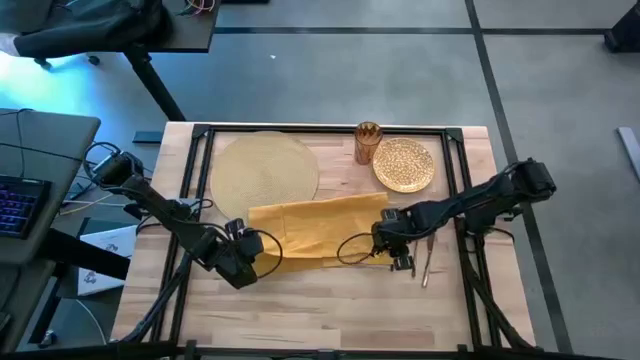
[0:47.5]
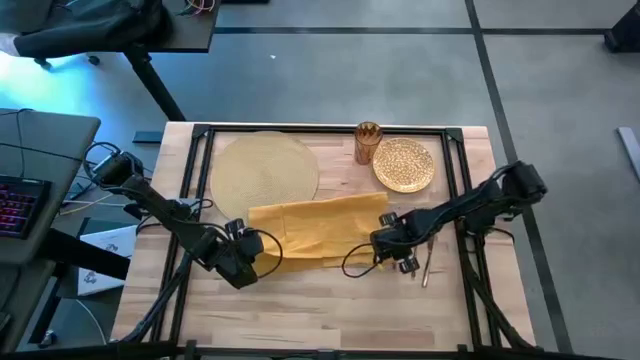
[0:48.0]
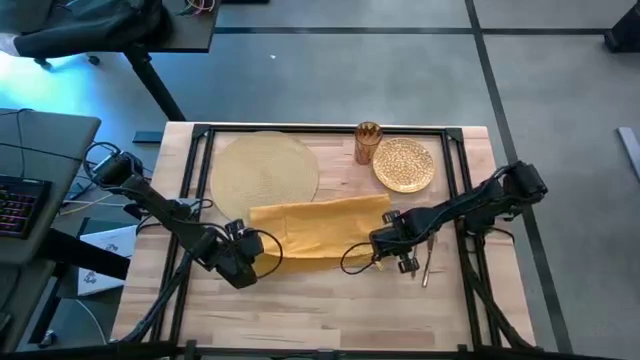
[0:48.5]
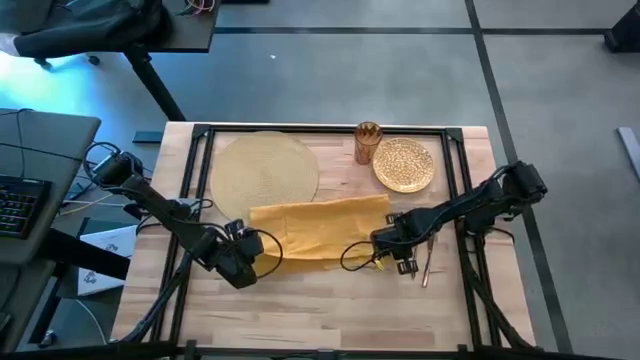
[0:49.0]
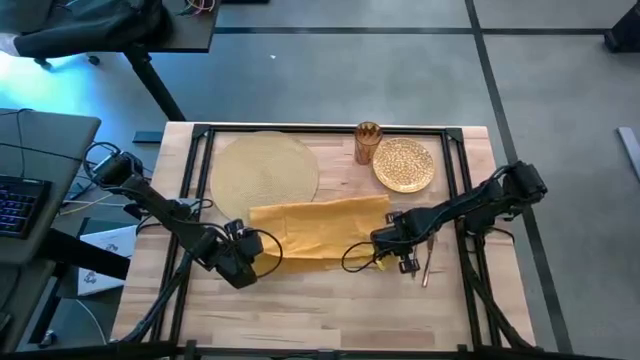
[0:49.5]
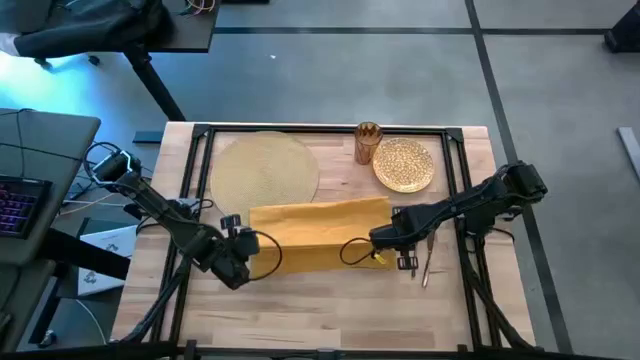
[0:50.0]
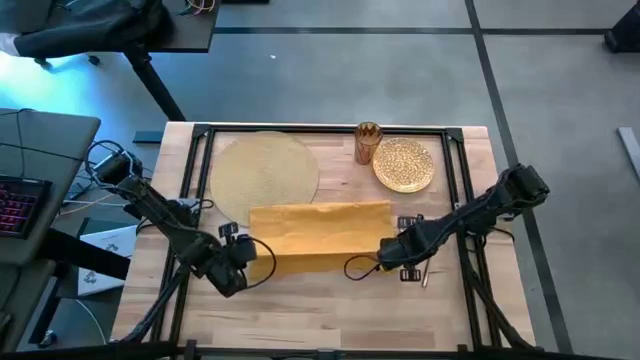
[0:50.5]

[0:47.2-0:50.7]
Task: Set table place
Fold the yellow table napkin

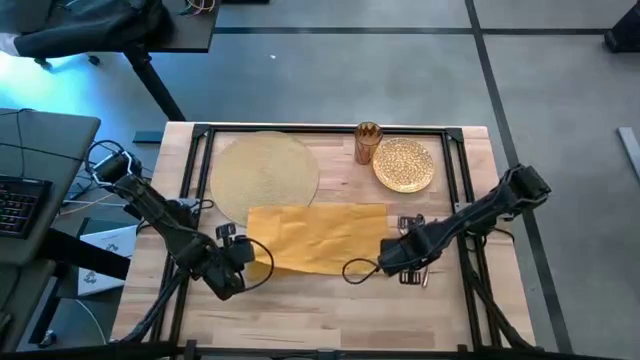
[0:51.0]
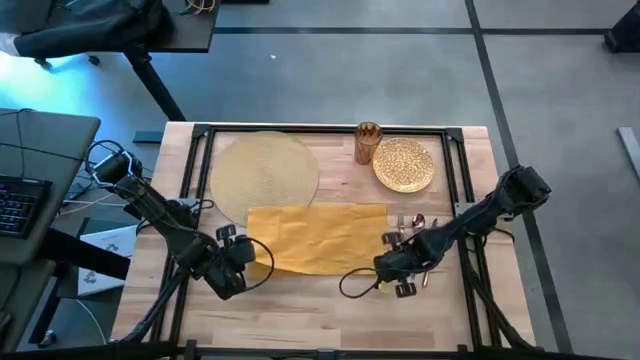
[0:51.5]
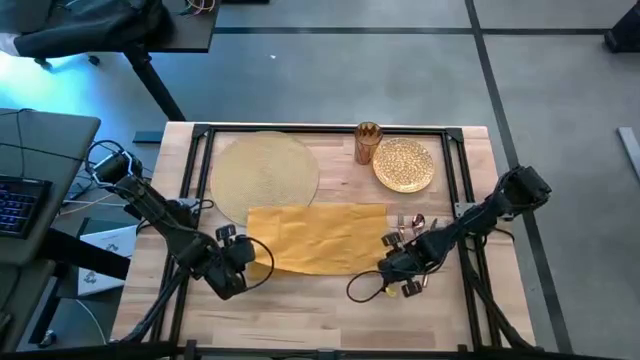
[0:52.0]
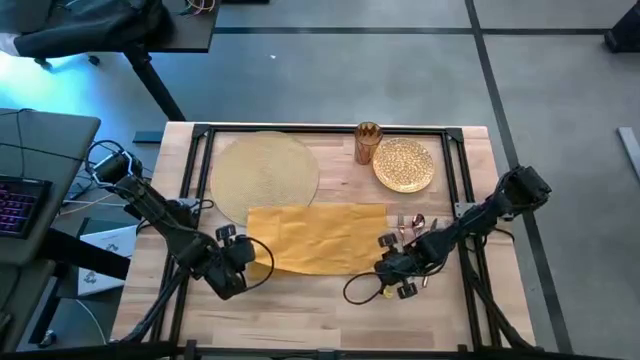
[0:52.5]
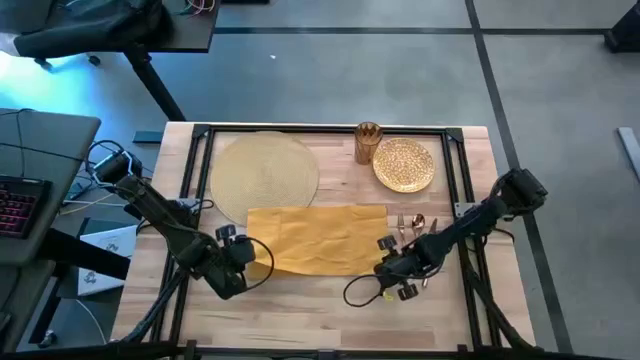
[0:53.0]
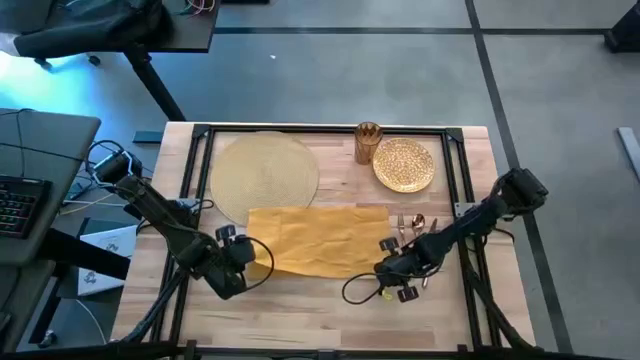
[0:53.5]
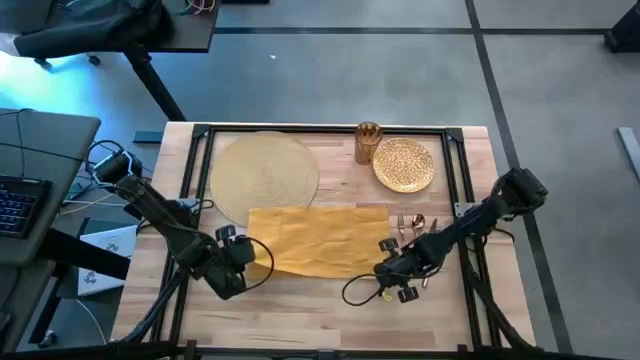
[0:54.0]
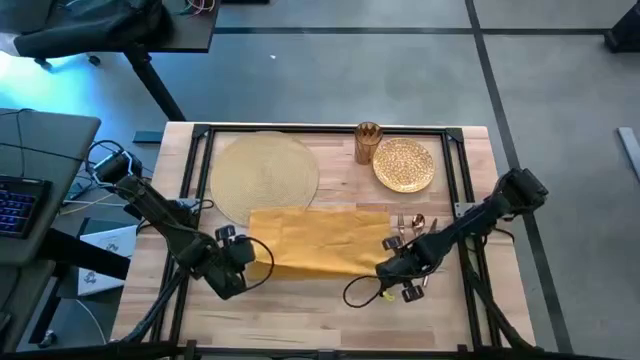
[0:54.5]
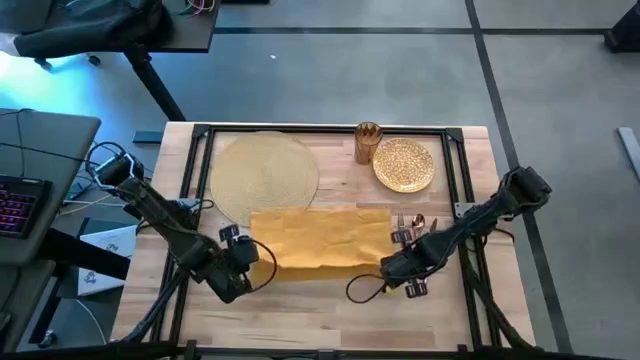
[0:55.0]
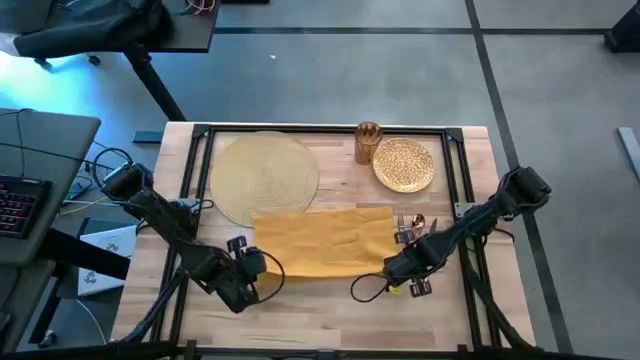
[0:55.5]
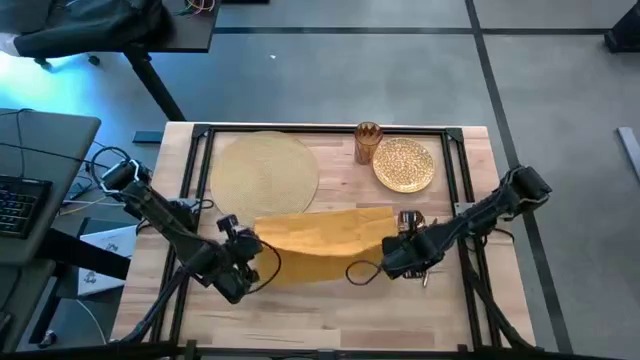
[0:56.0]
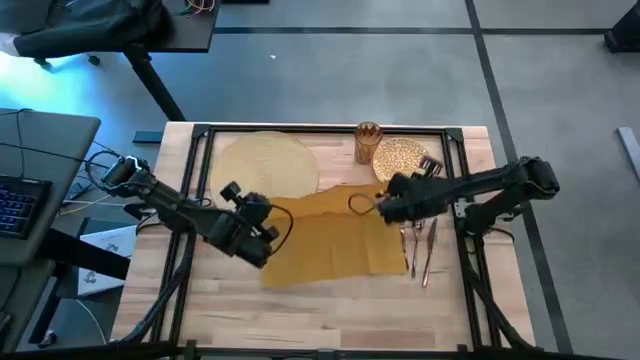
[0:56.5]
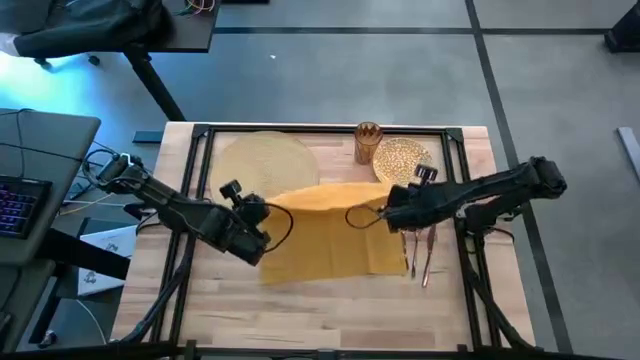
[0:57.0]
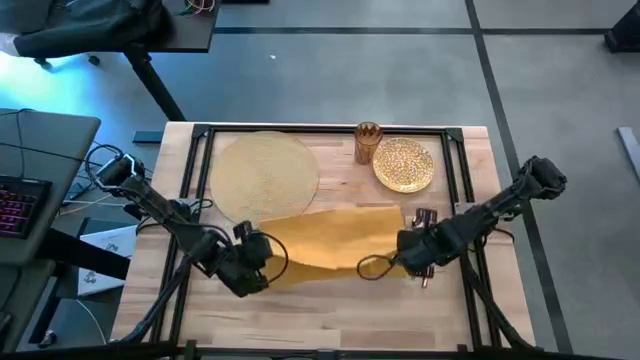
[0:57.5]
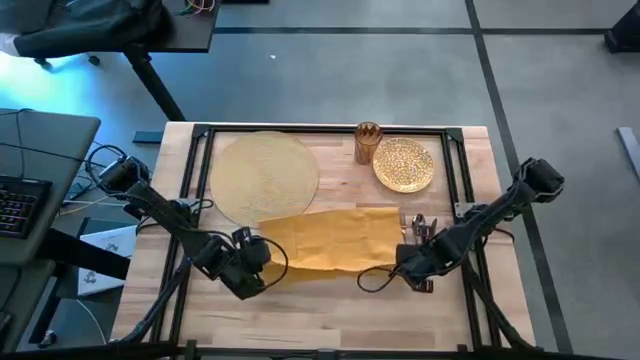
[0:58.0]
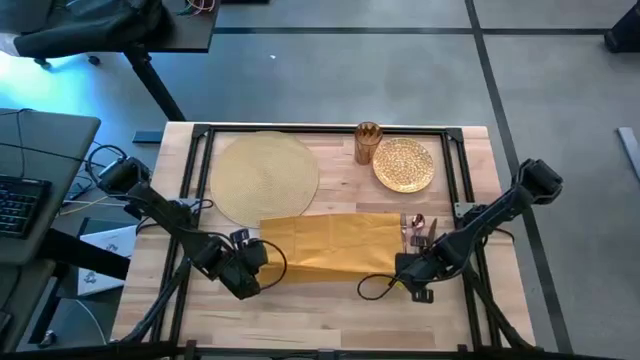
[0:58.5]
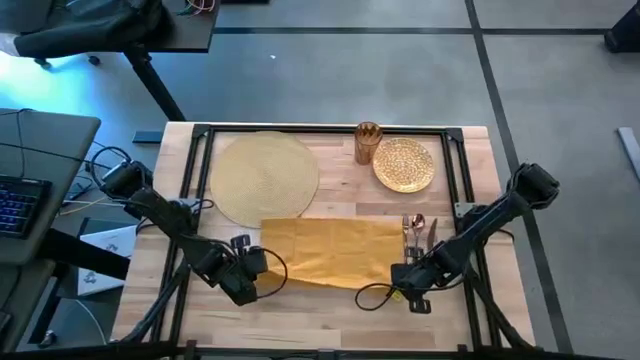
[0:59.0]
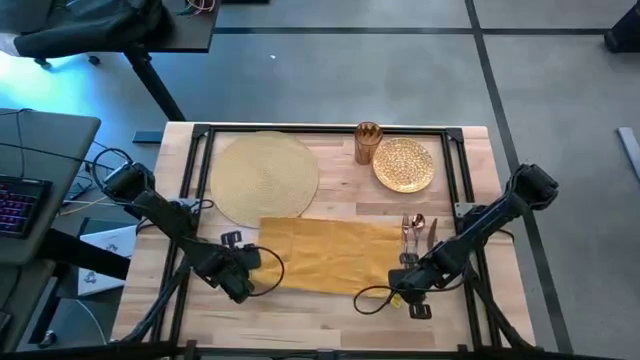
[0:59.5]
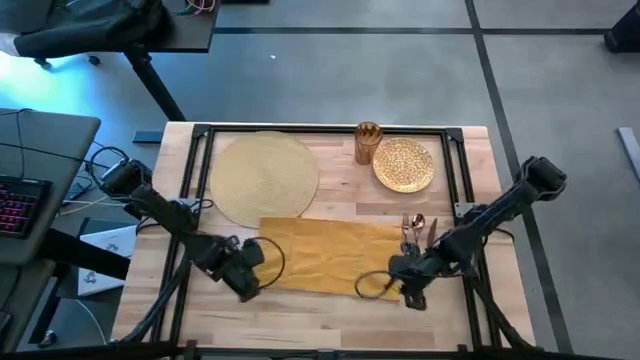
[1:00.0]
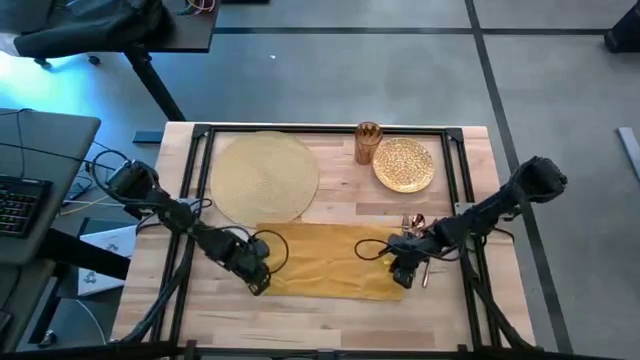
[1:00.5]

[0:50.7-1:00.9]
Fold the yellow table napkin

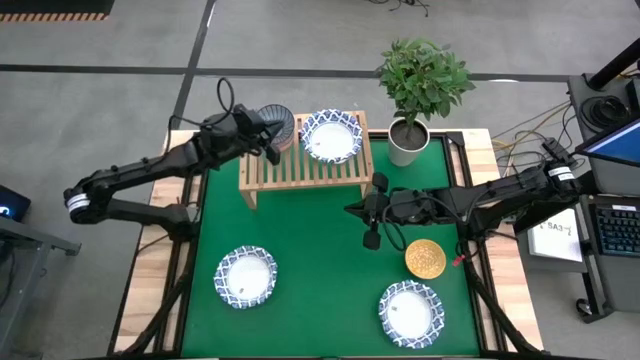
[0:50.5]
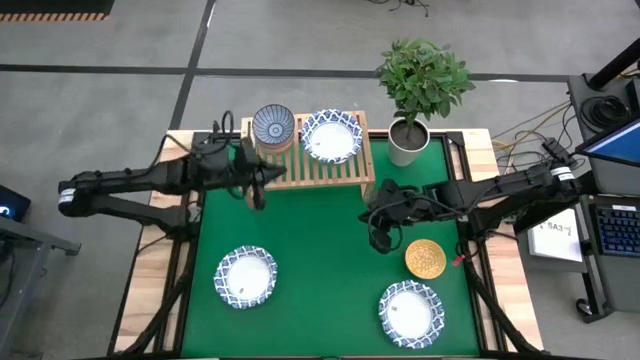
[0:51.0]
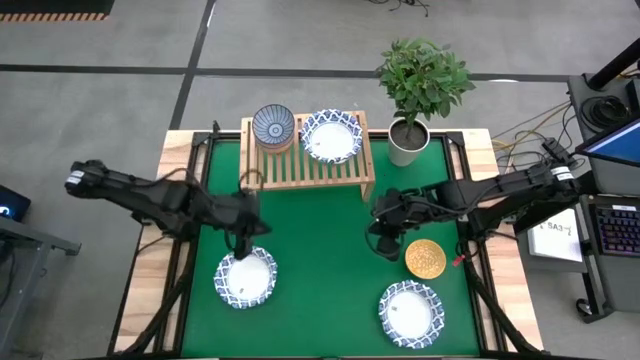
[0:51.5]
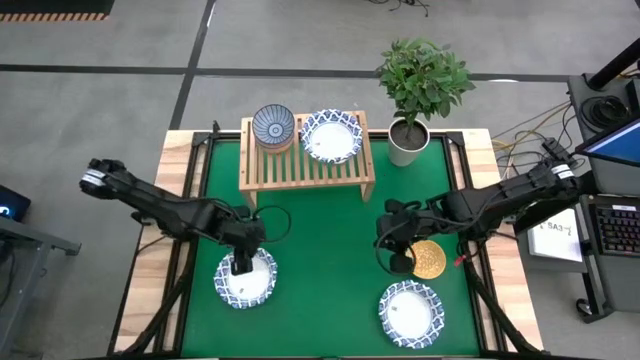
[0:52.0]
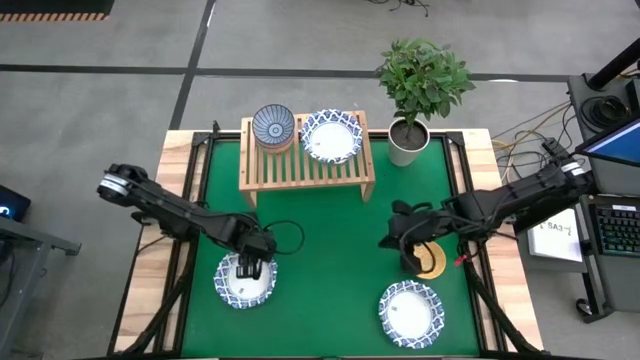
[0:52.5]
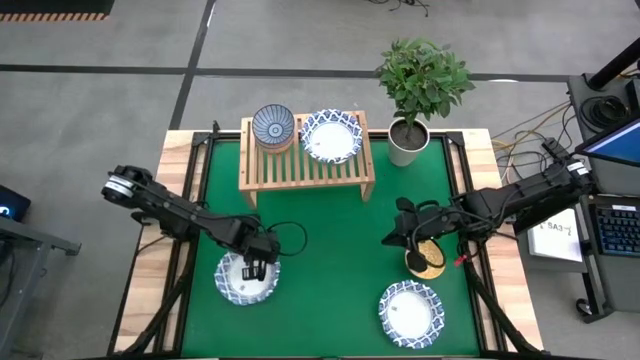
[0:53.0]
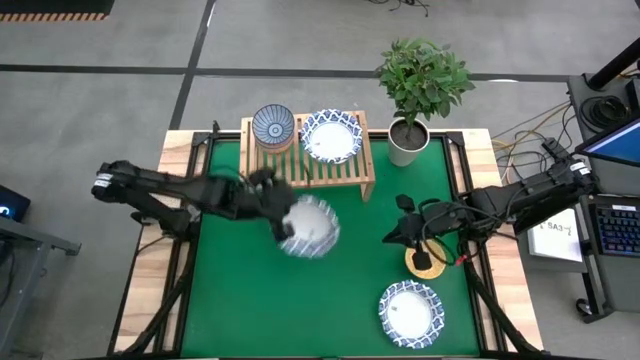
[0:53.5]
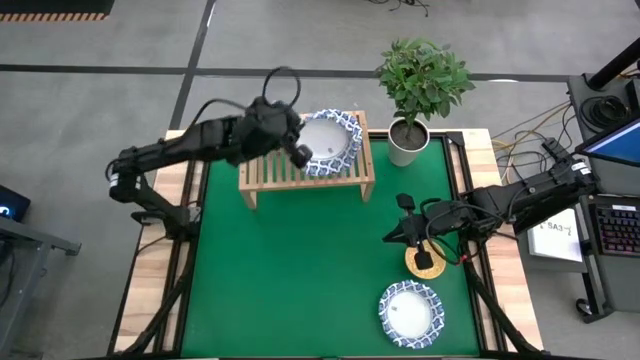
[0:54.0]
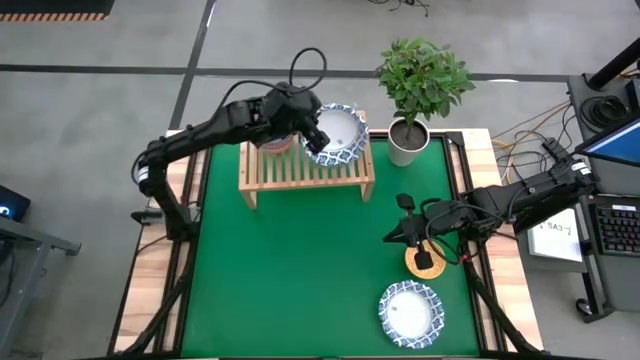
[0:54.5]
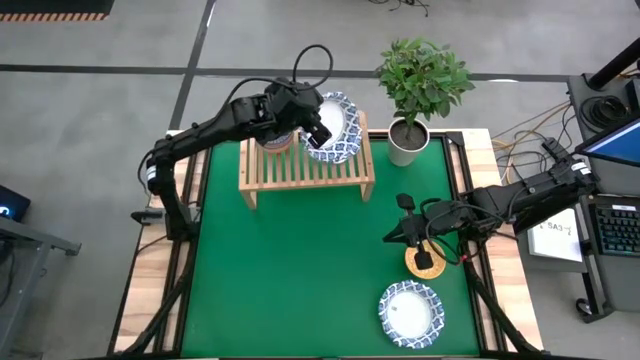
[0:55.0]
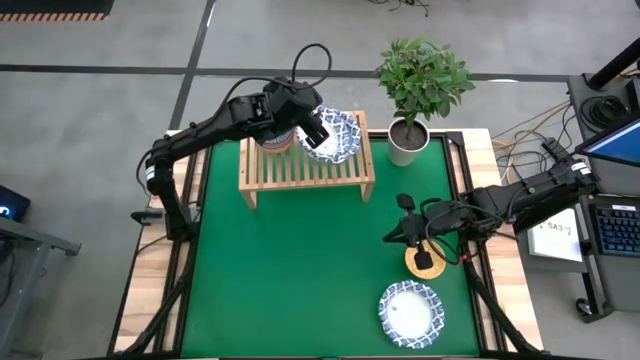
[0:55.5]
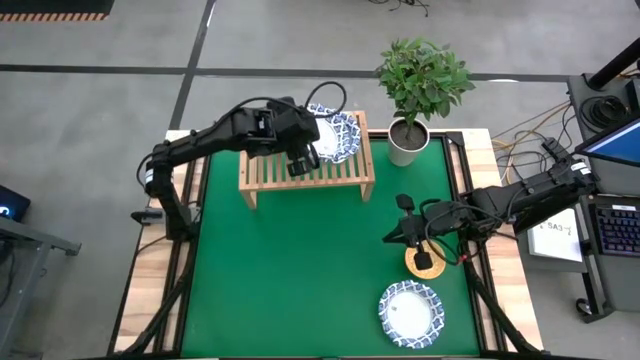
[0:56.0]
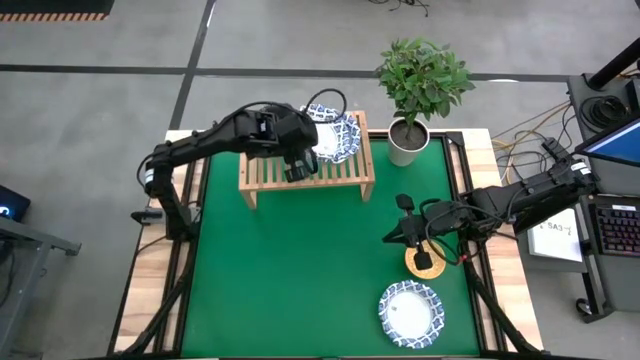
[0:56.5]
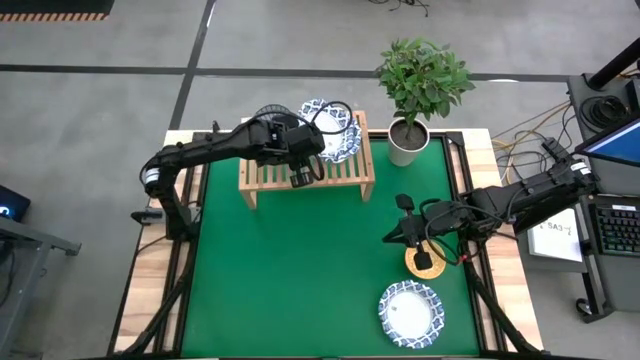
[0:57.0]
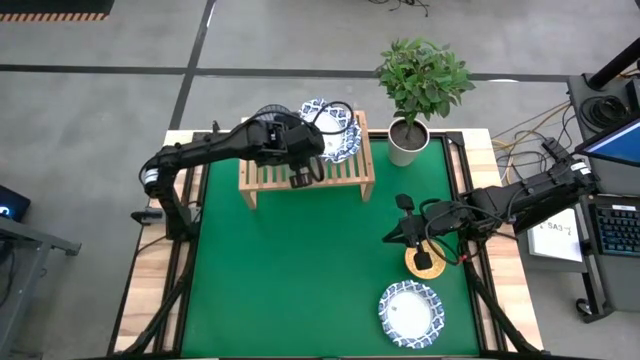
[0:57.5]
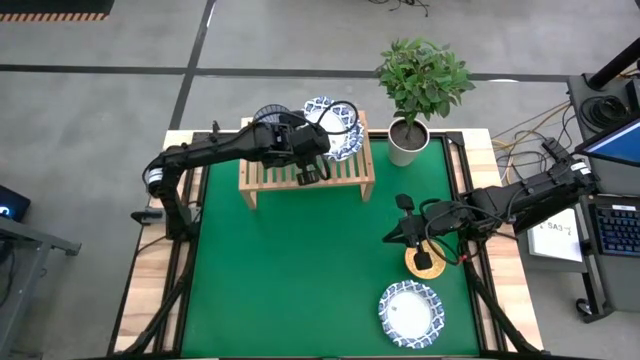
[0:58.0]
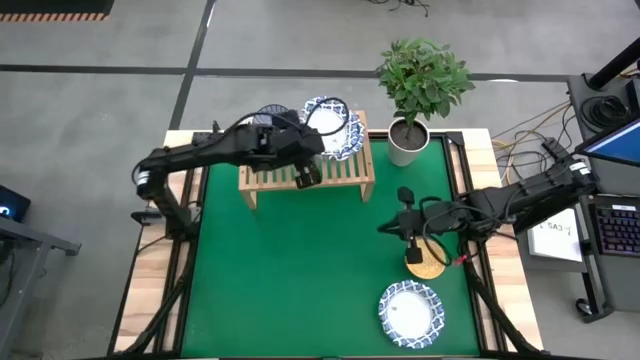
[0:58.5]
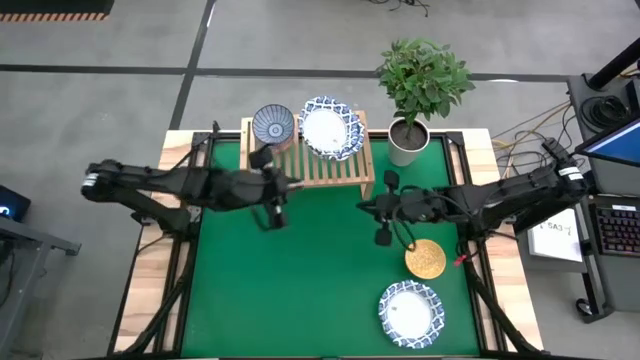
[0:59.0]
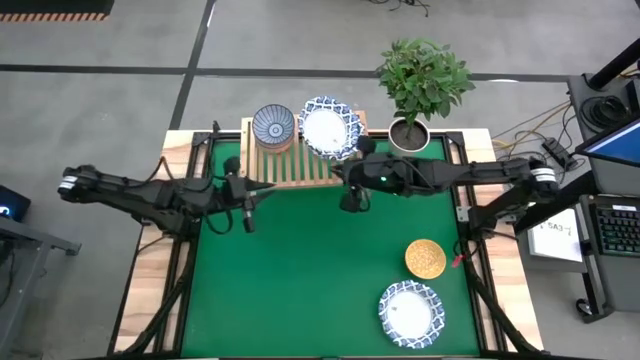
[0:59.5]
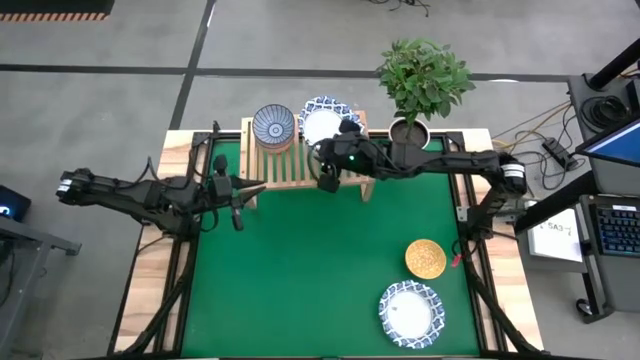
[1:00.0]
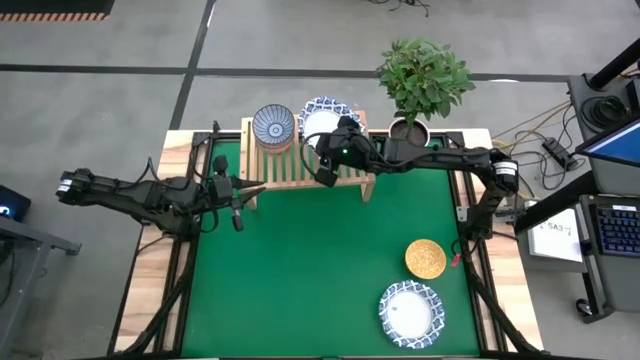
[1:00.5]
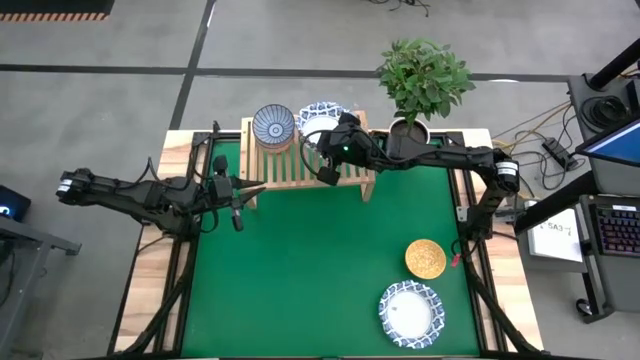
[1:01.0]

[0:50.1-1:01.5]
Task: Place and stack bowls onto a shelf
Stack the white bowl on top of the white bowl on the shelf
